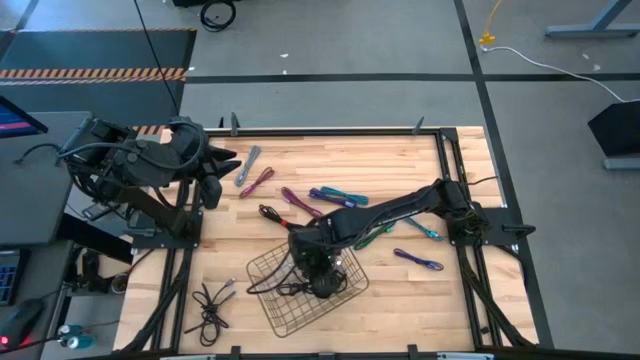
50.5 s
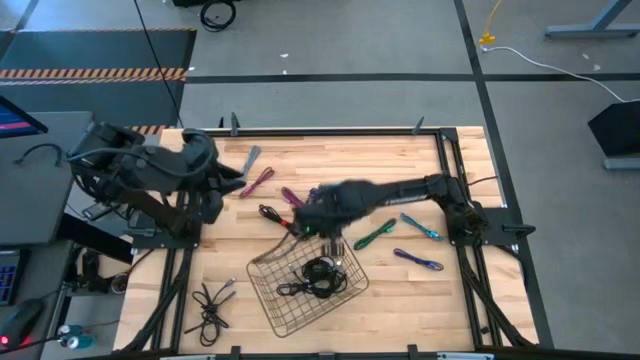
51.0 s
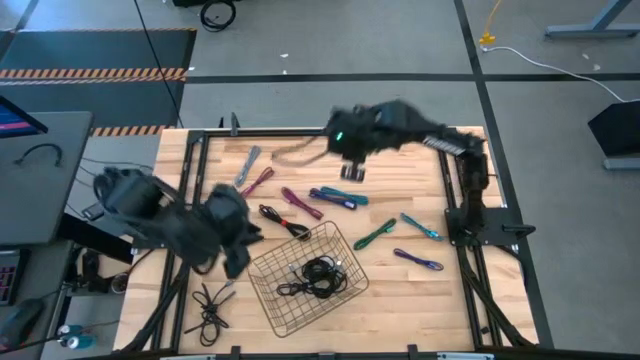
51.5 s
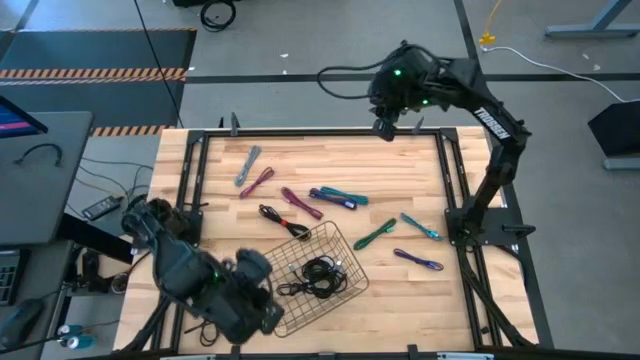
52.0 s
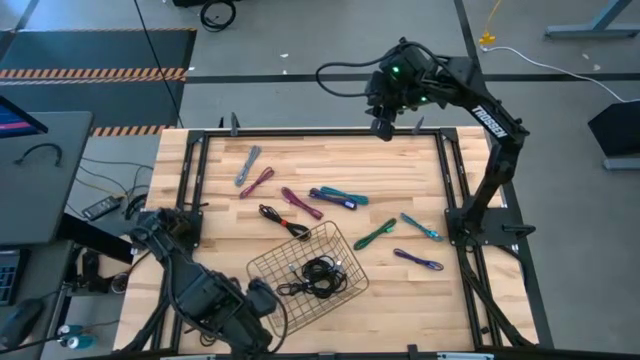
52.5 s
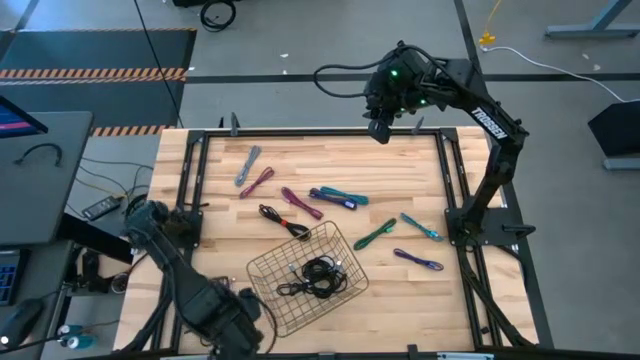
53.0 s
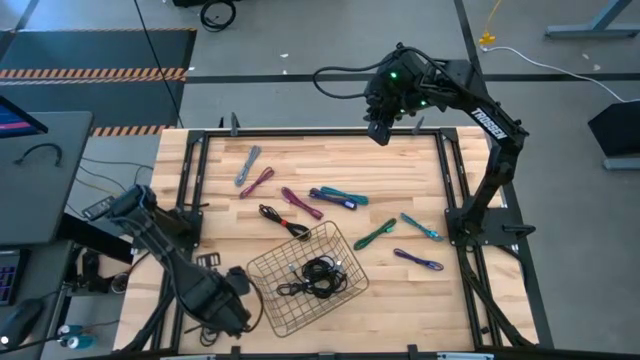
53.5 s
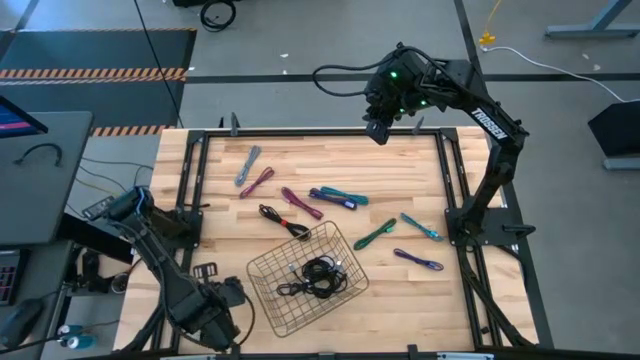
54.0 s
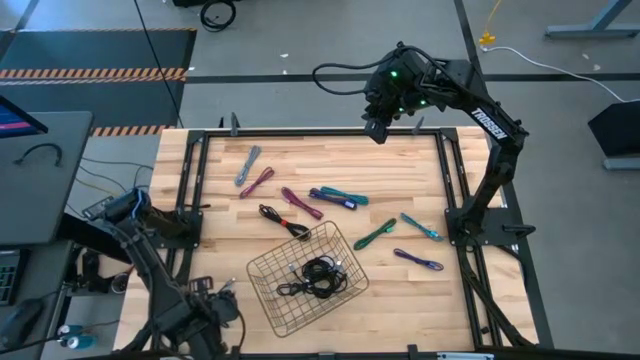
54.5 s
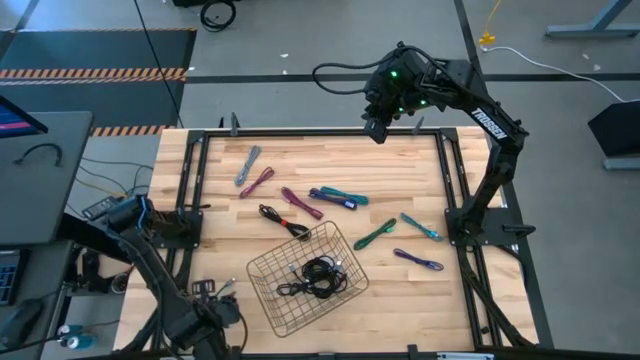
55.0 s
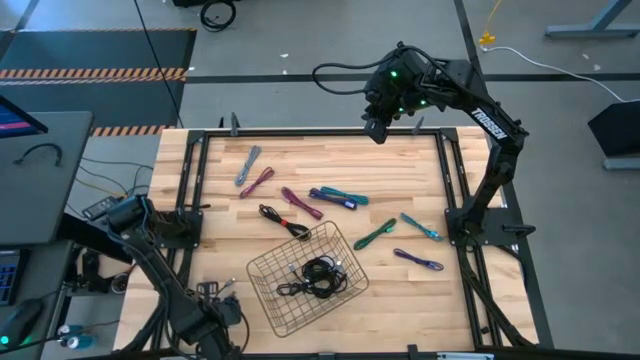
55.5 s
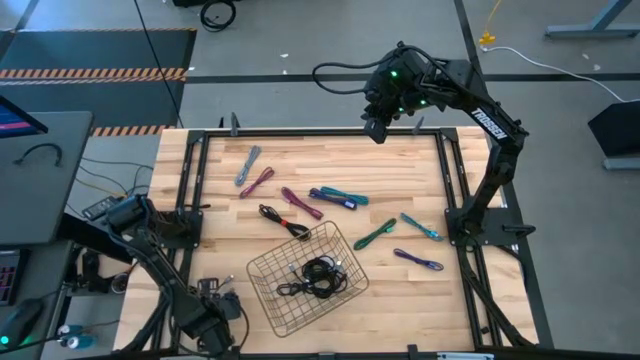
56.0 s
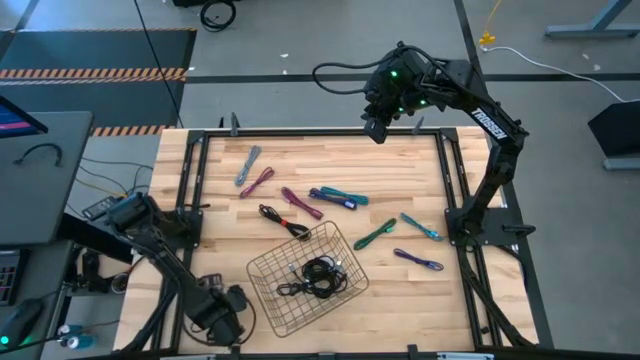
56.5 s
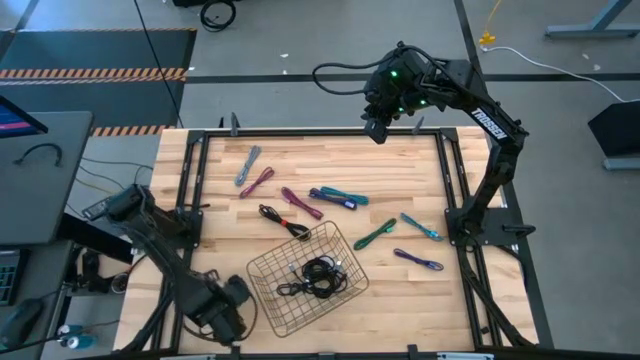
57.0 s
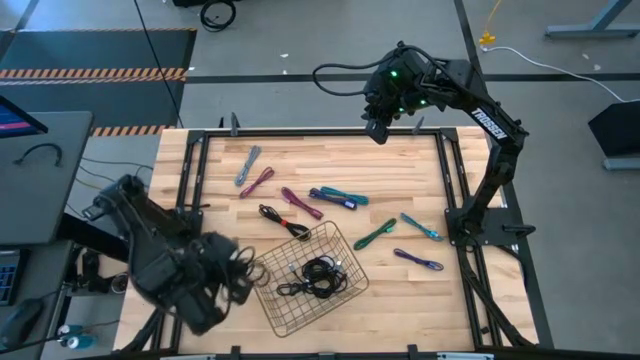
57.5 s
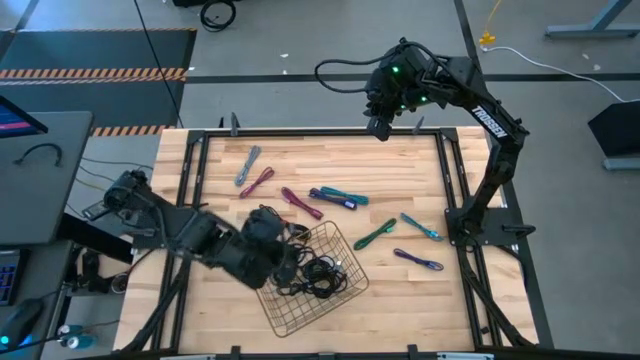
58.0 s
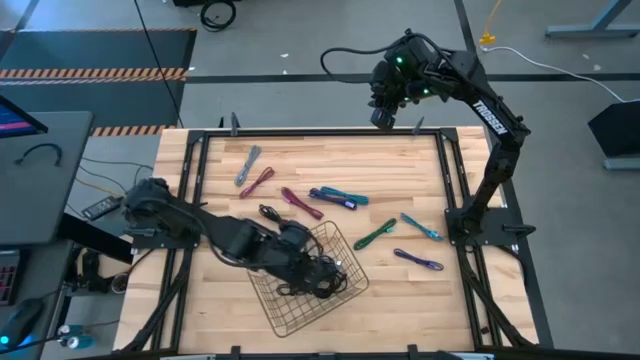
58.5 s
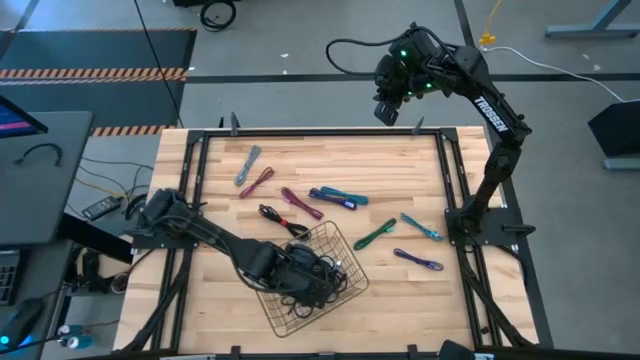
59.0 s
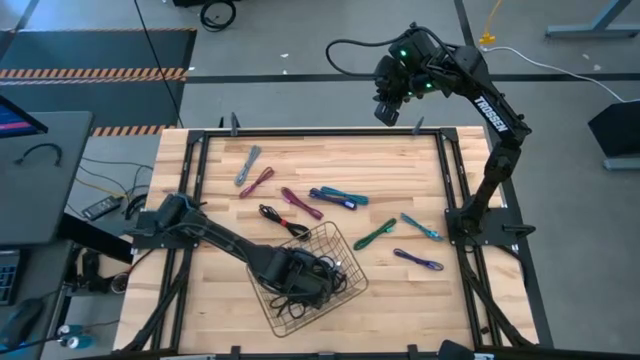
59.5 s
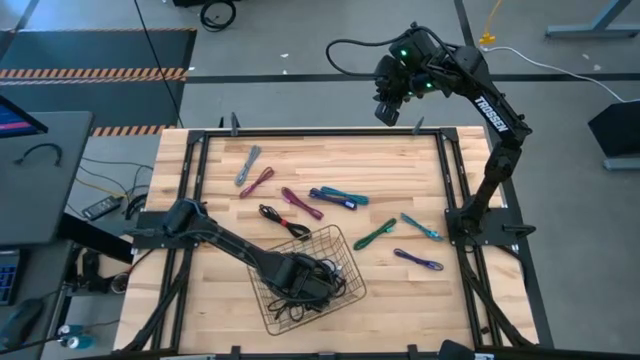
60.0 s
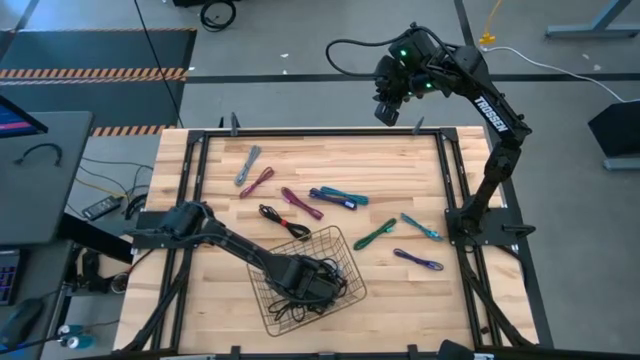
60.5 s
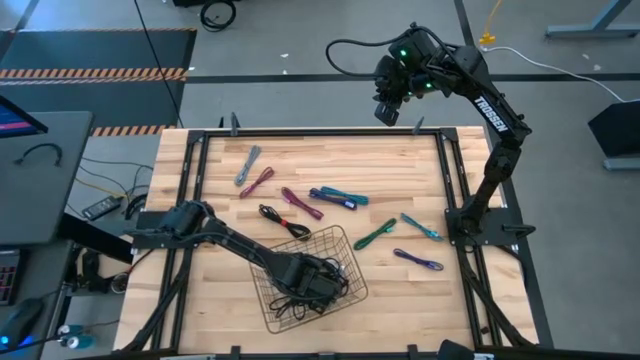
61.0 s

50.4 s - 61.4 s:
Task: Pick and place USB-C Cables
Put the black charger cable into the wire basket

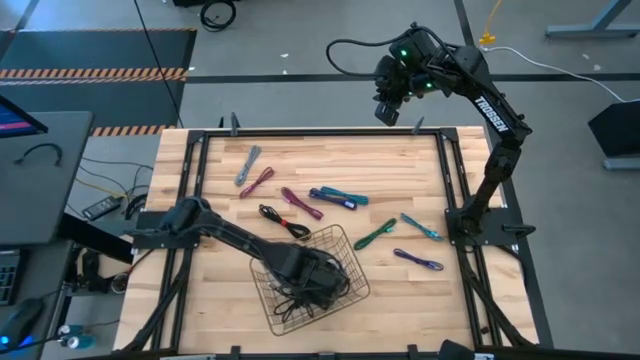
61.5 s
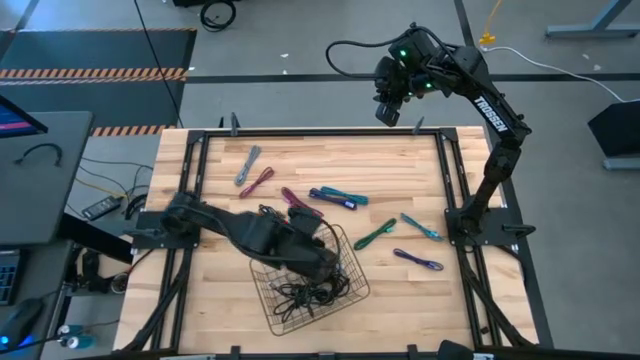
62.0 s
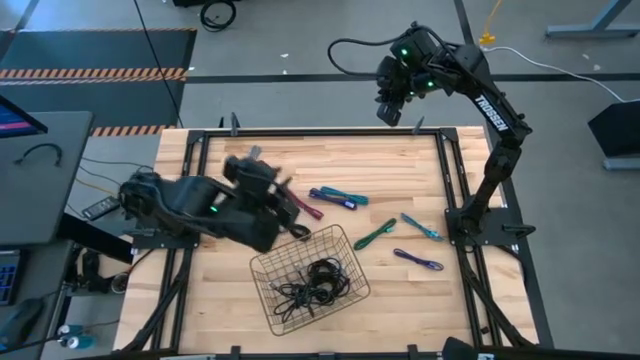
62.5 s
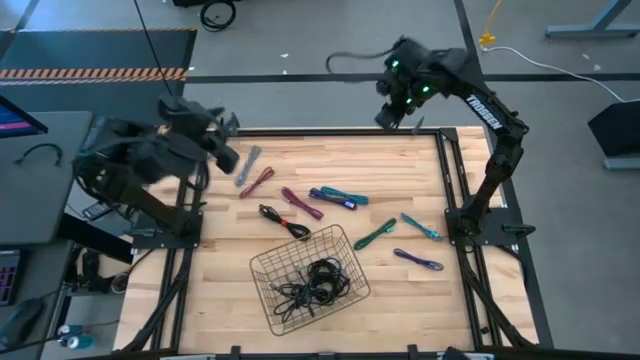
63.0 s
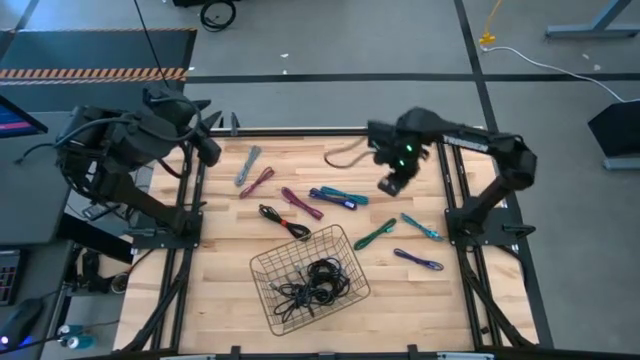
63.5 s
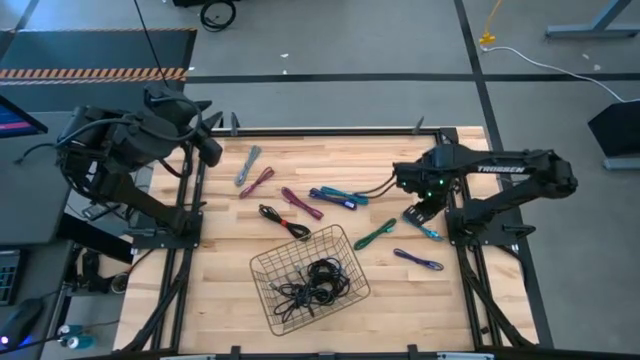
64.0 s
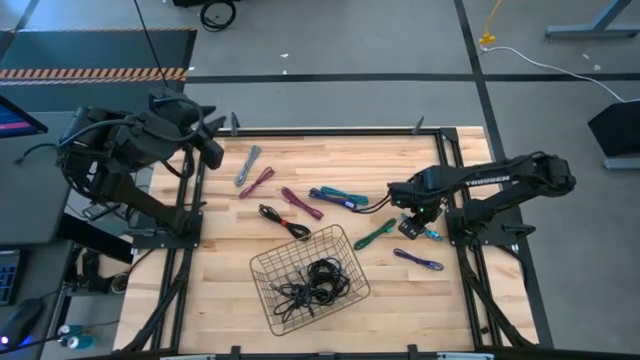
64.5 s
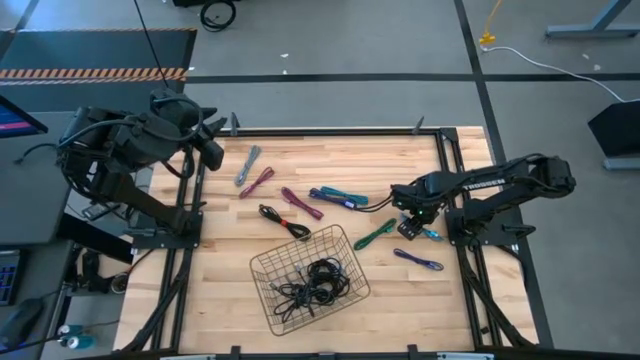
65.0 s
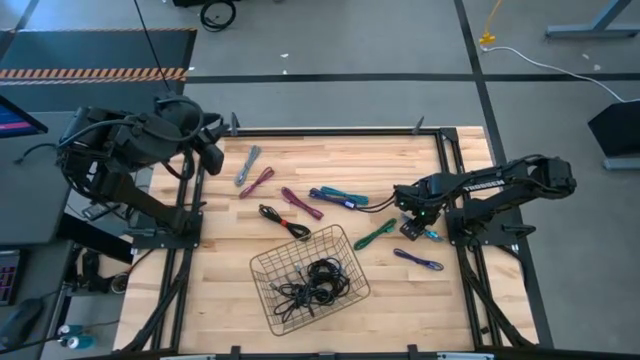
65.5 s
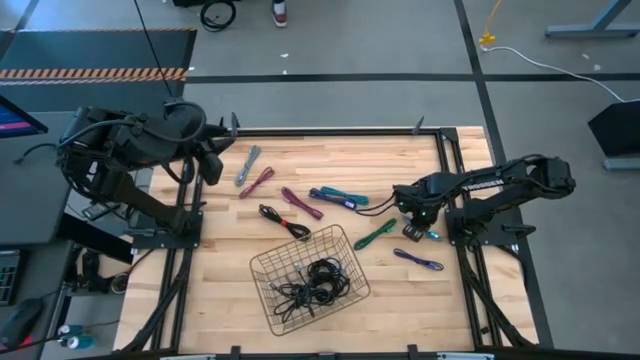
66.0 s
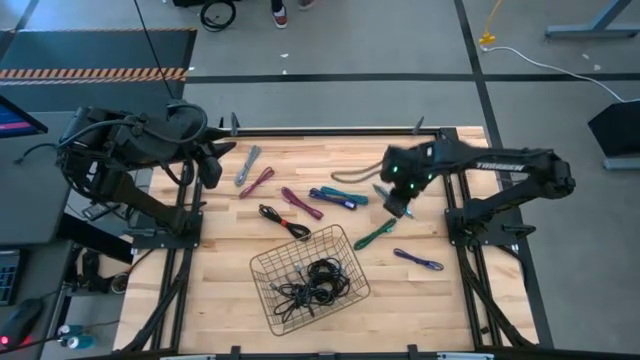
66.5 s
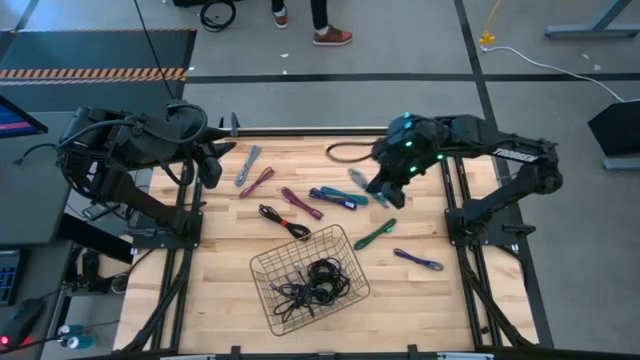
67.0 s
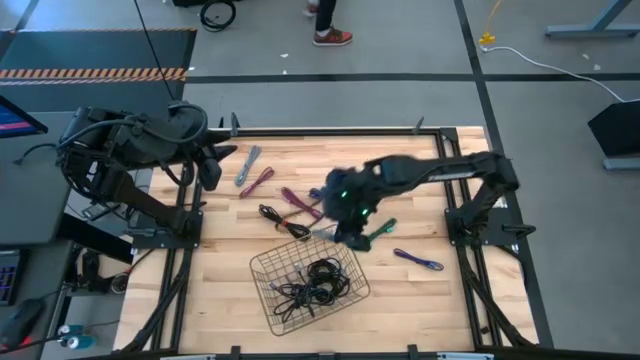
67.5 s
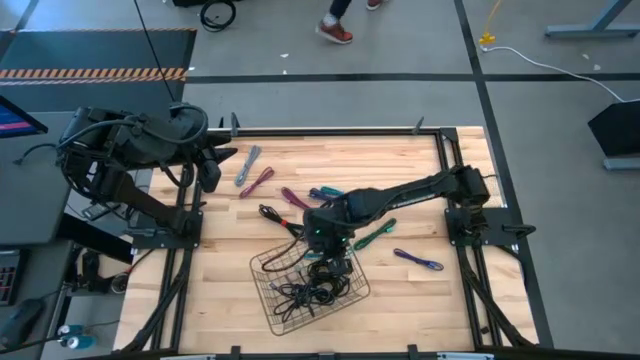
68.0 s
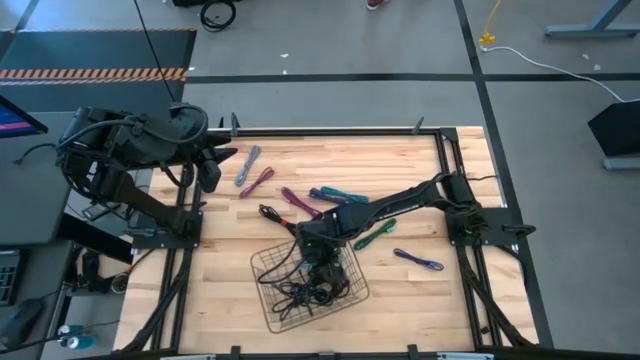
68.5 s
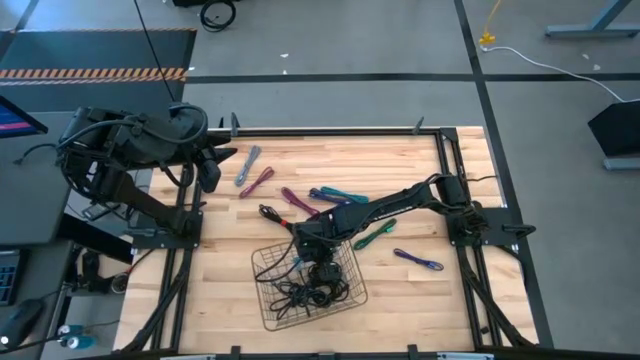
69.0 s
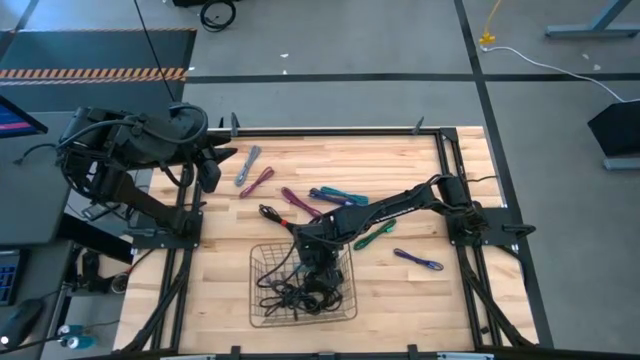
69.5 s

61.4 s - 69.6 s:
Put the light blue charger cable into the wire basket
